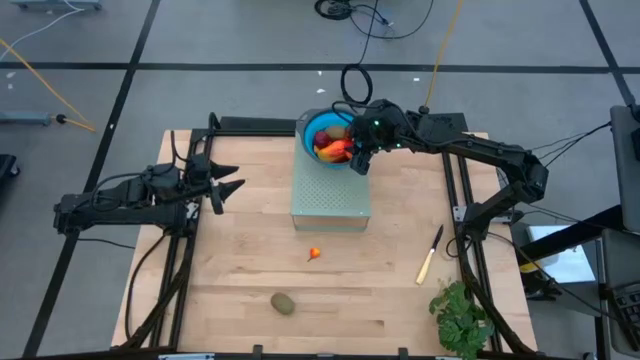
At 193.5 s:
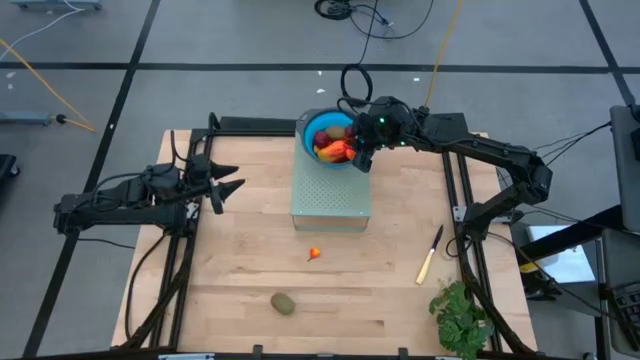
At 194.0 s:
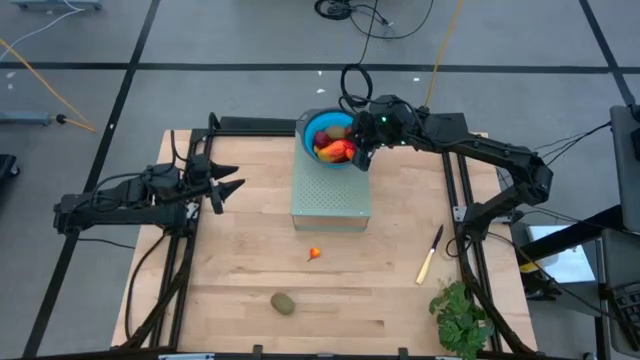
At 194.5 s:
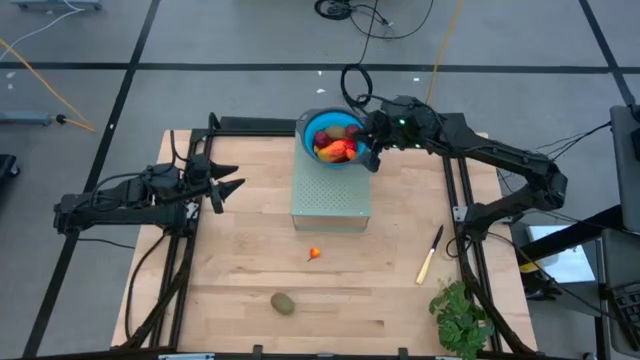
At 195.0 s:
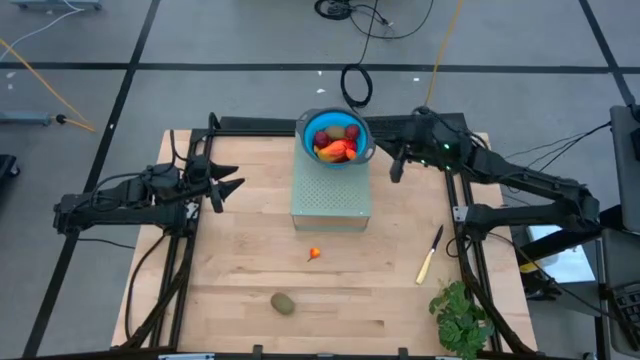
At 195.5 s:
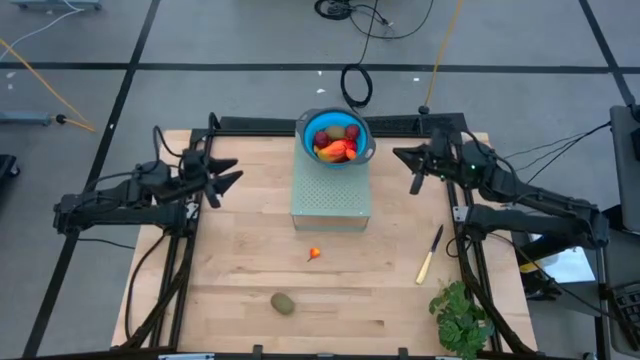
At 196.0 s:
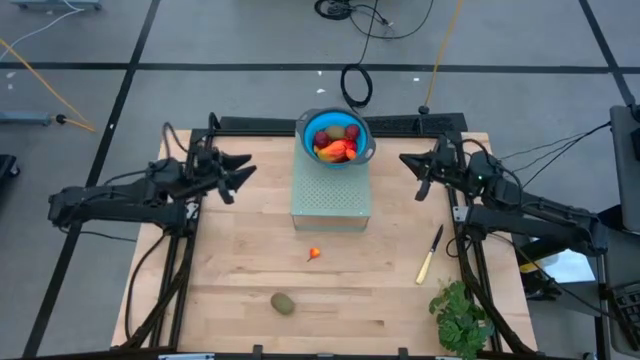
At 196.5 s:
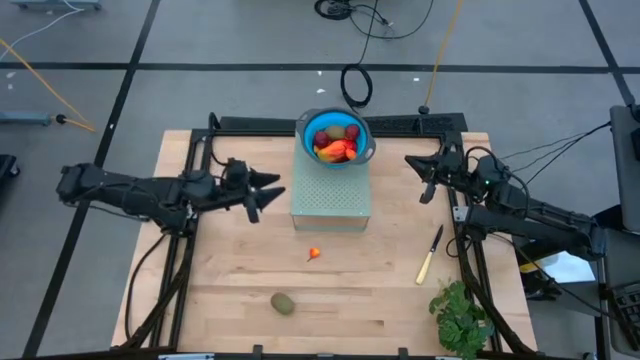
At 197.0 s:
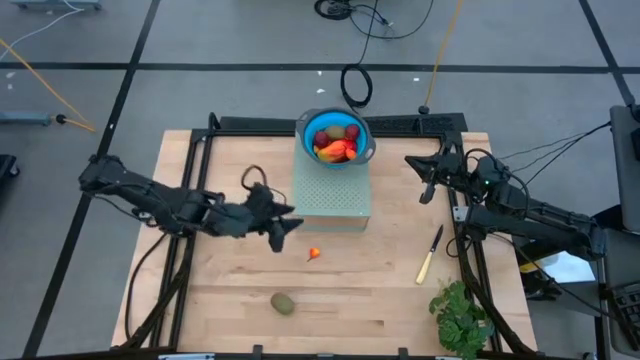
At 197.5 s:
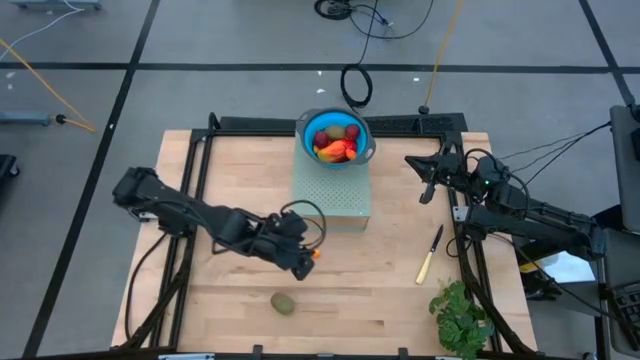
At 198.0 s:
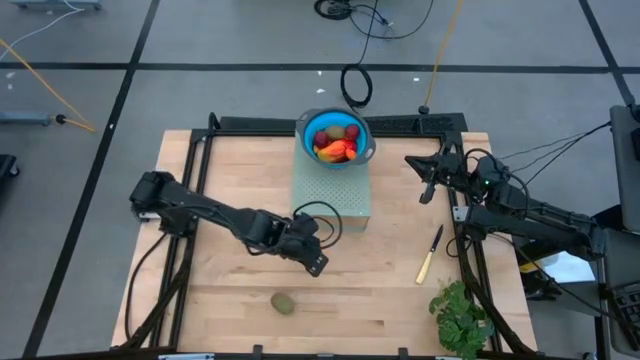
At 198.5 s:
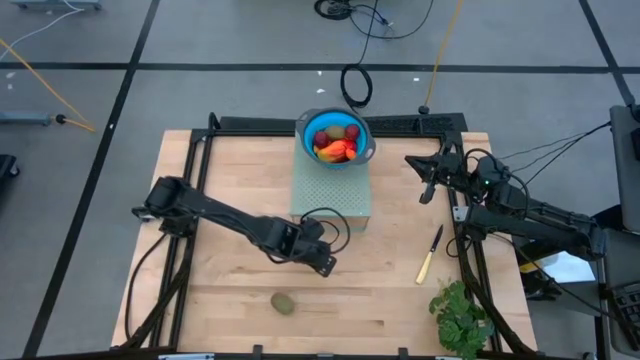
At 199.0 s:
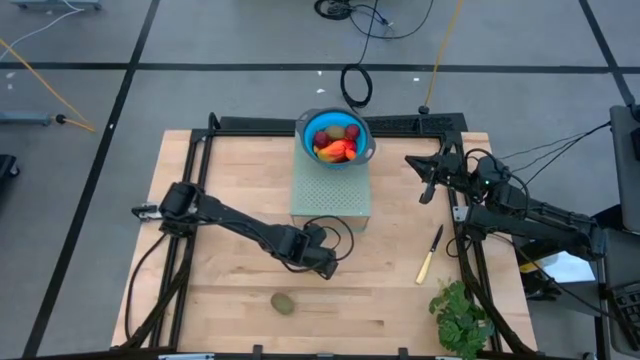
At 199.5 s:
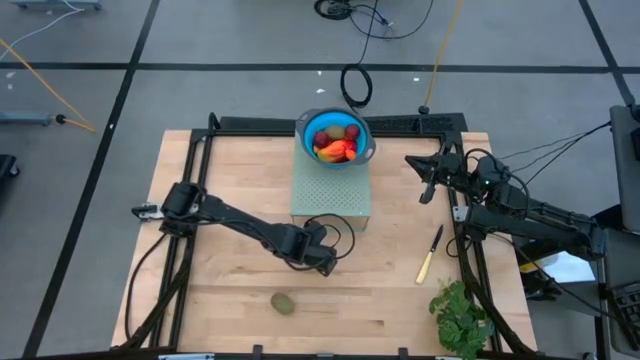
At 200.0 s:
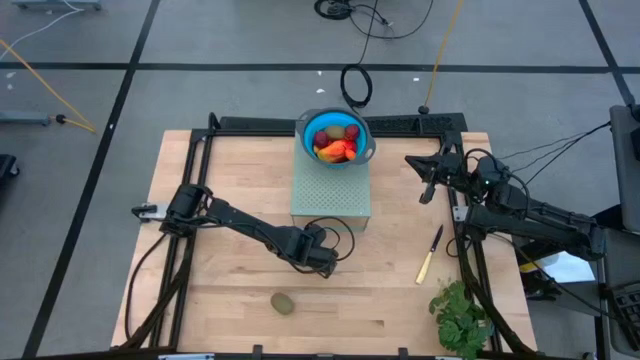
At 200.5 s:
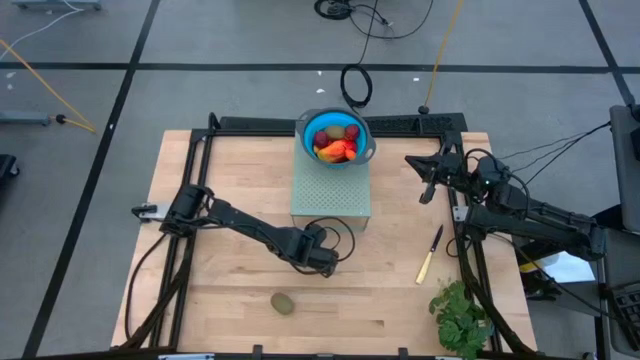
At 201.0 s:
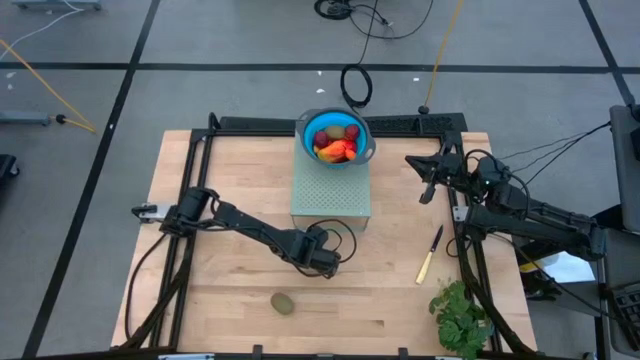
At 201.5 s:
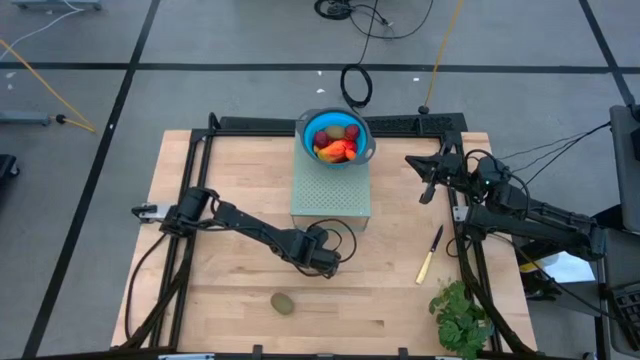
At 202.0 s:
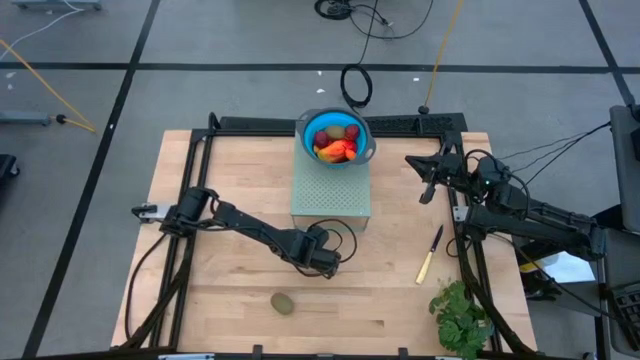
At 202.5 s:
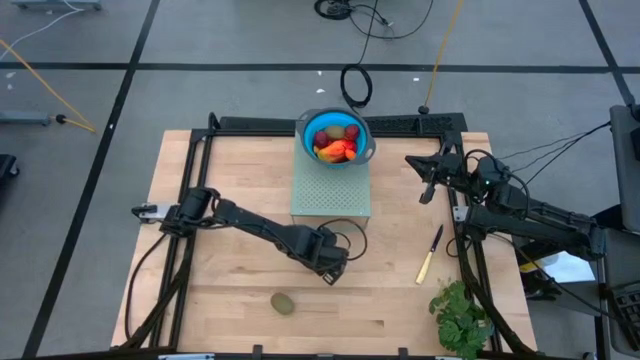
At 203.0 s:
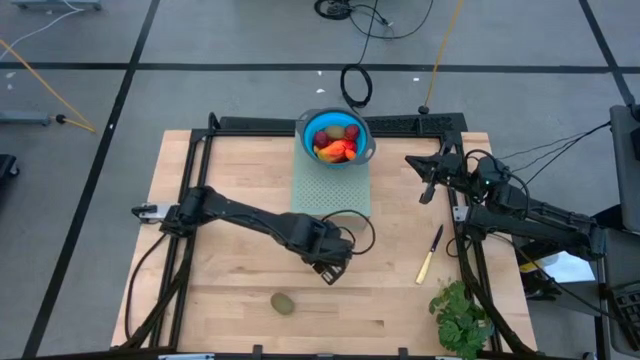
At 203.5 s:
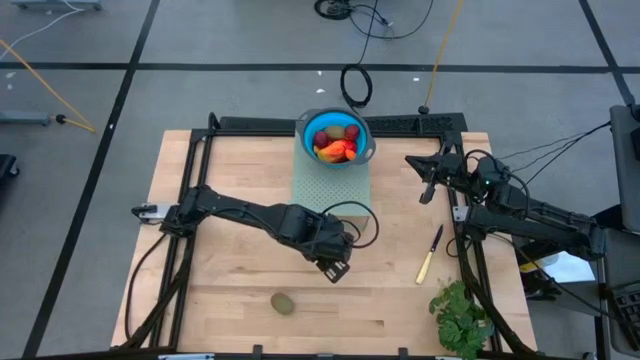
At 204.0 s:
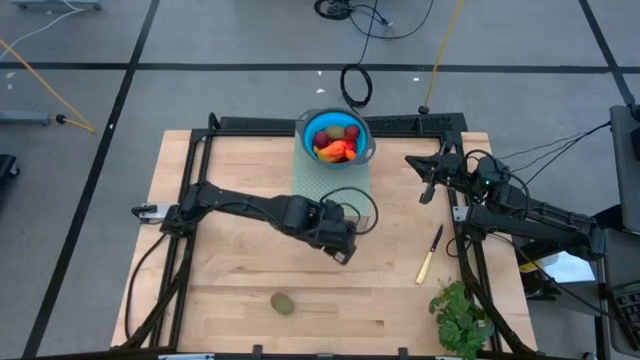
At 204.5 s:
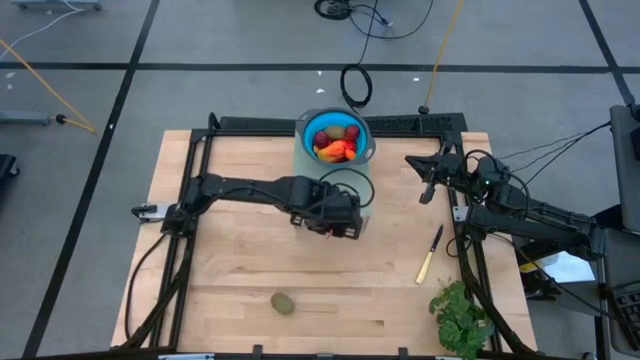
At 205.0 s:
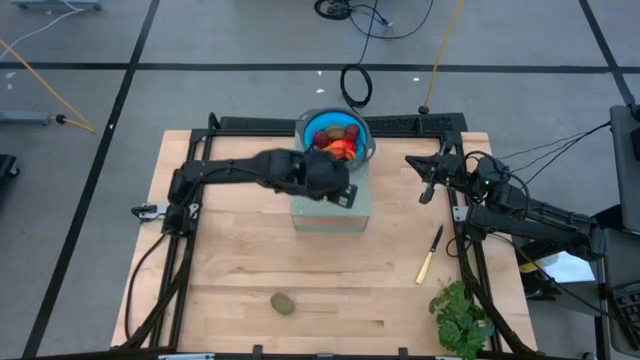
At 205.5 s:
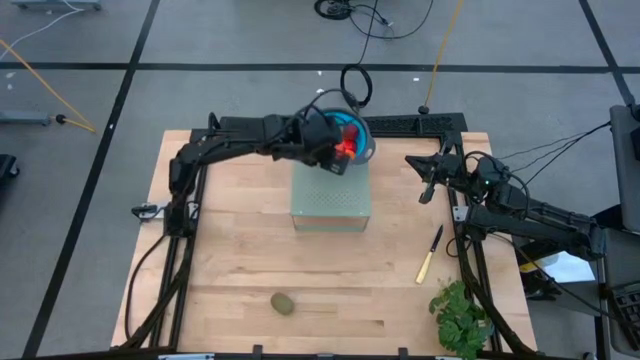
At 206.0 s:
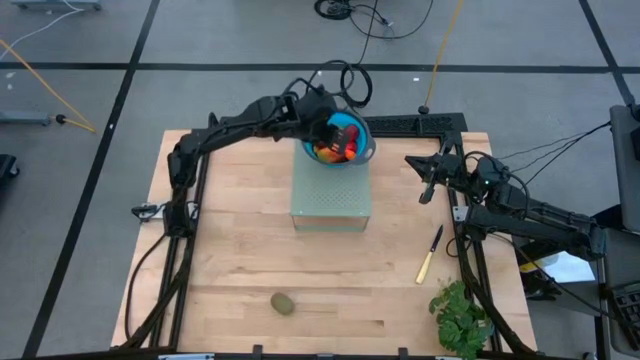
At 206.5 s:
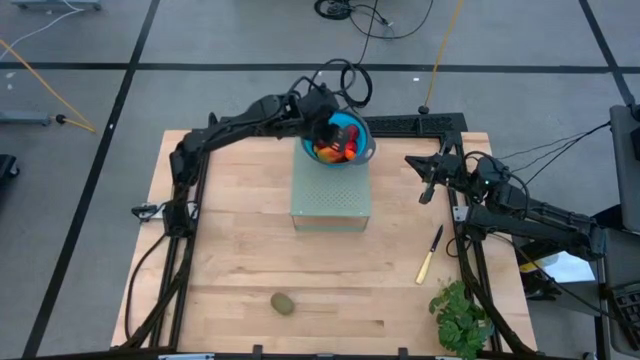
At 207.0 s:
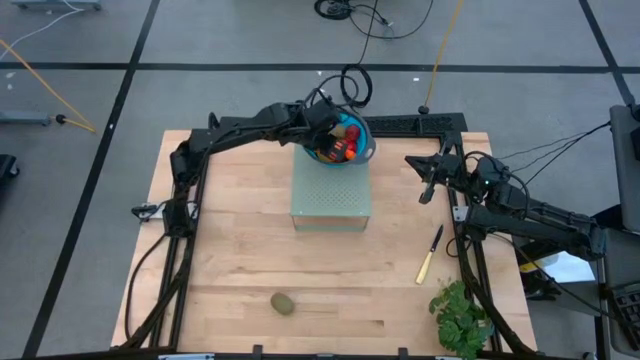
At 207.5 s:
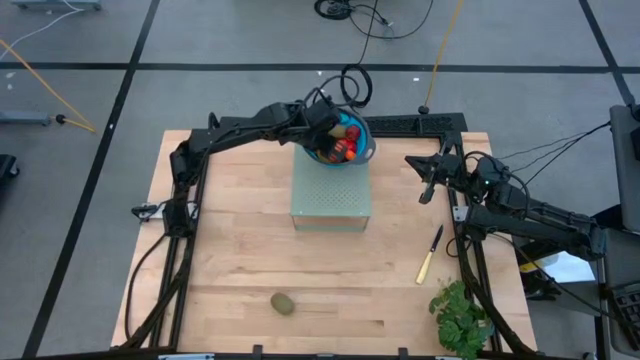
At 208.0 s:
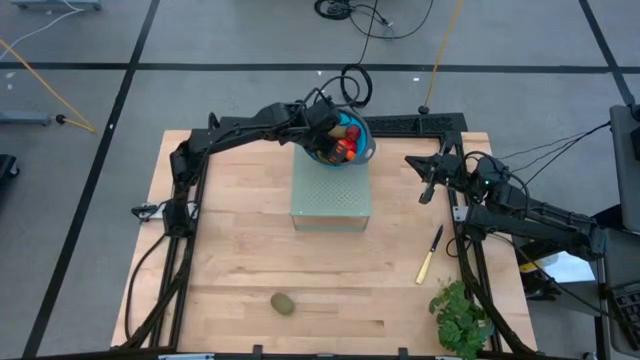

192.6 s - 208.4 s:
Task: Pick & Place Fruit
Put the pear into the blue strainer bowl on the shelf

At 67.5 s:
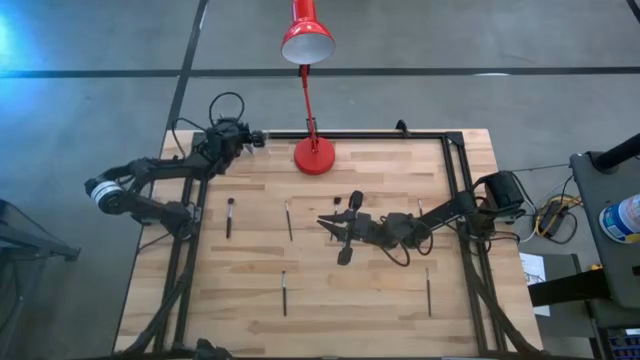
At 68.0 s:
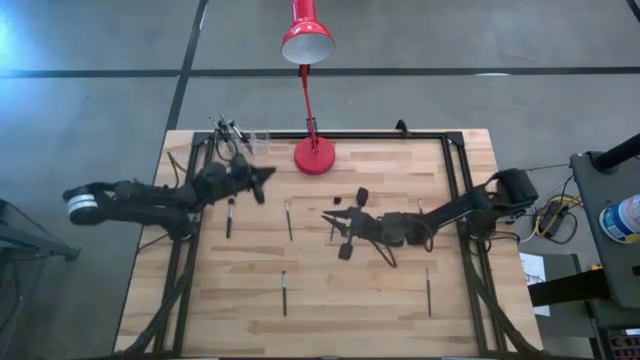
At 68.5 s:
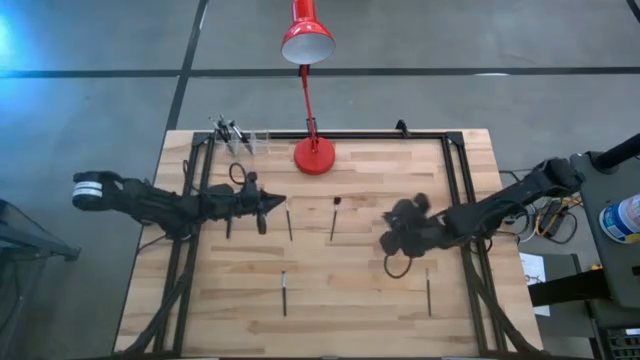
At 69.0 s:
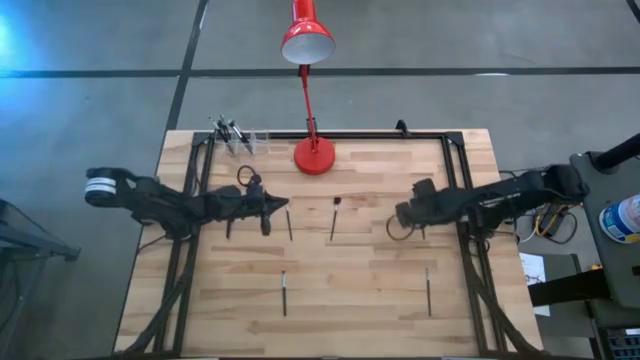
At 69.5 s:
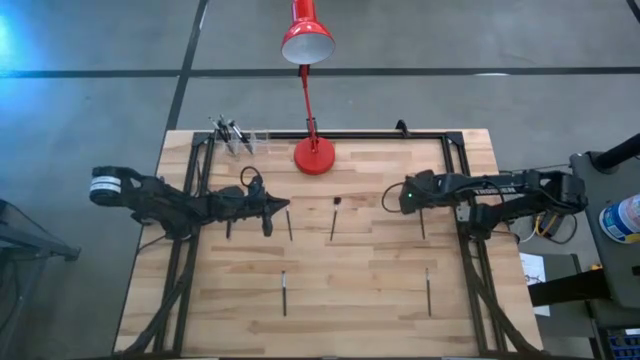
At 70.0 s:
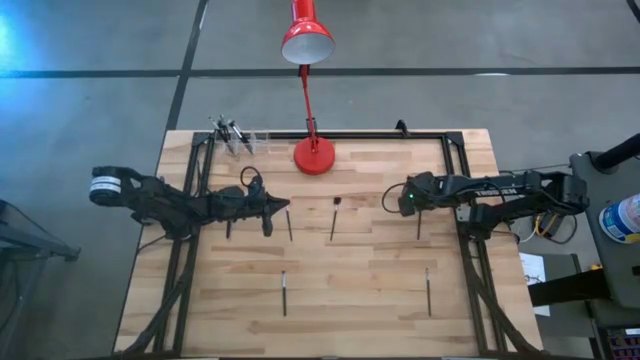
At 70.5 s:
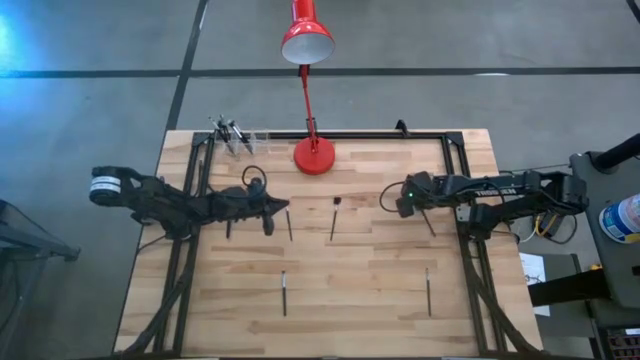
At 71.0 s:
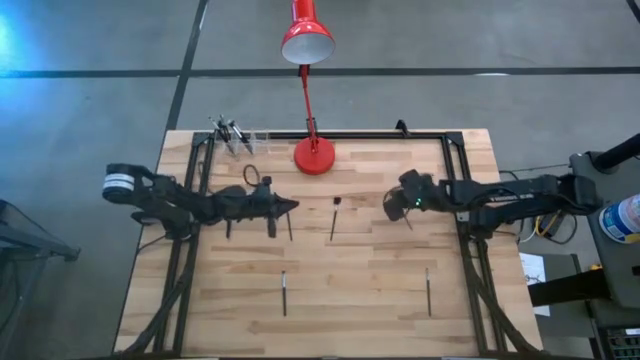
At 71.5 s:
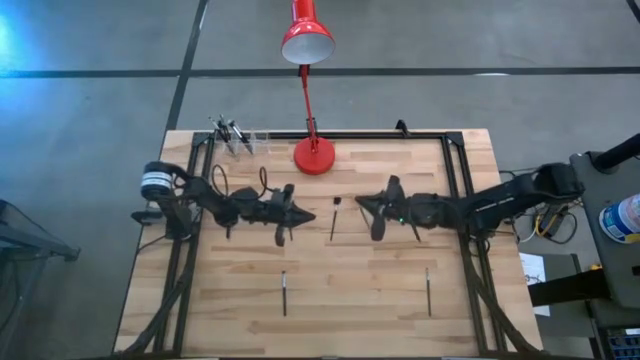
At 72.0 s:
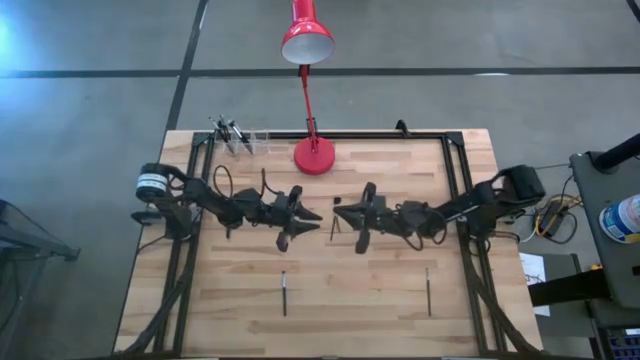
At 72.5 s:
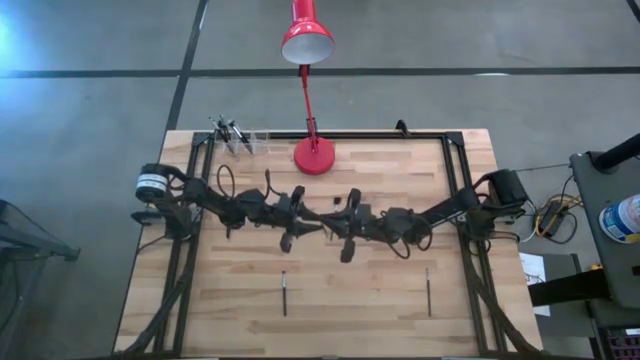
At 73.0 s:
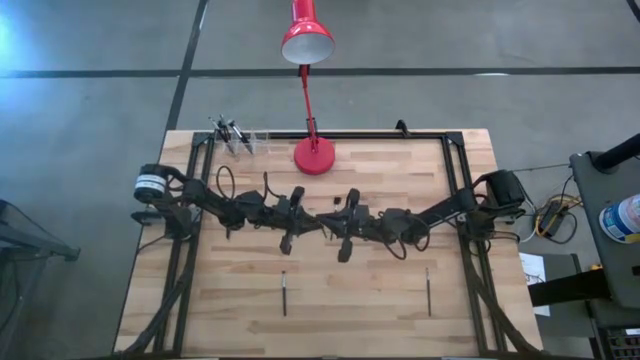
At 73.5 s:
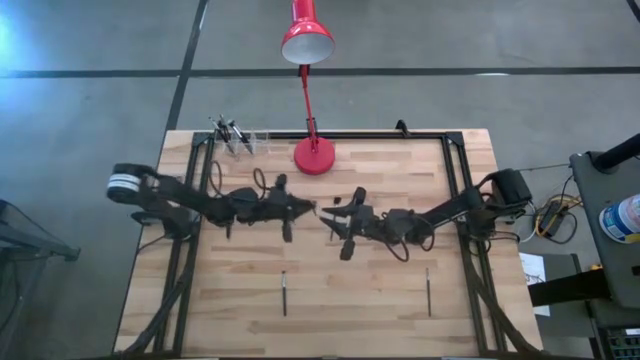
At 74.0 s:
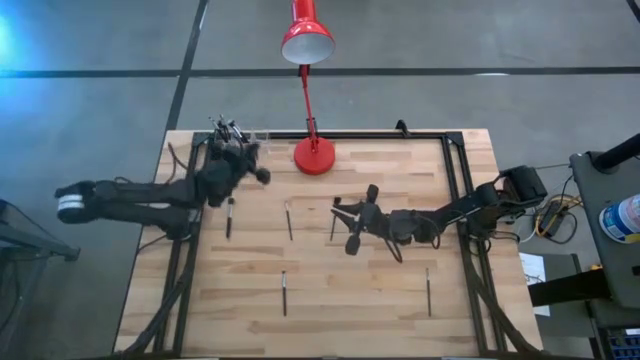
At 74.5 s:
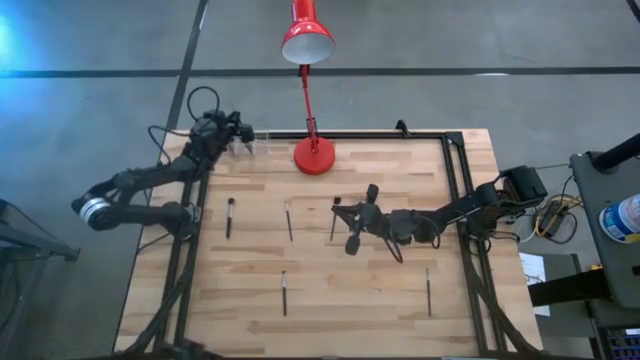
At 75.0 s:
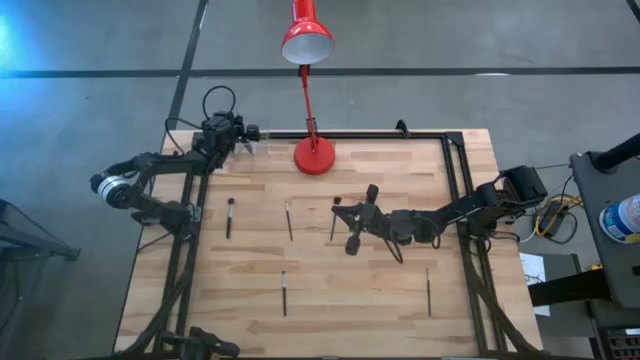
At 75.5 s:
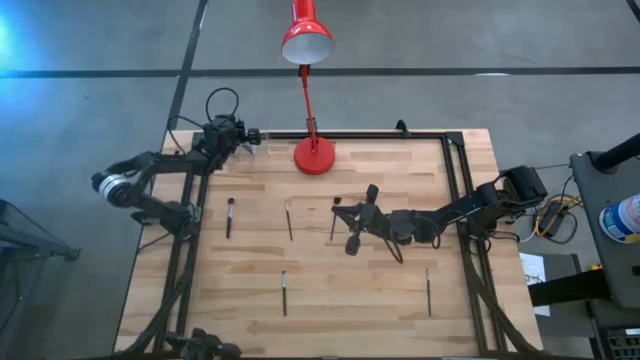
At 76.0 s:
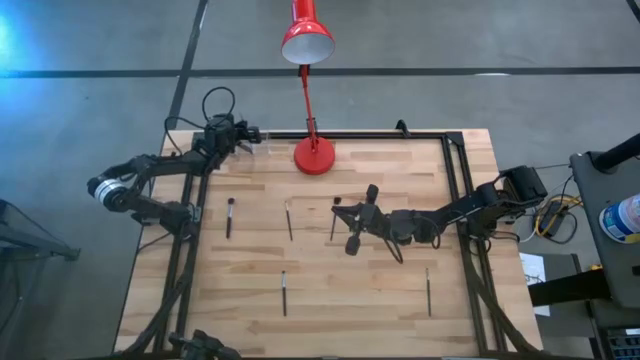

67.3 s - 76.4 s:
Task: Pick & Place Makeup Supplies
Put the makeup brush into the transparent organizer
